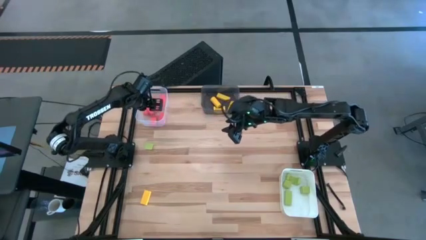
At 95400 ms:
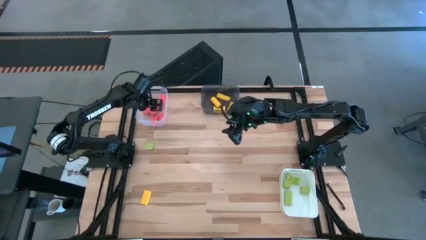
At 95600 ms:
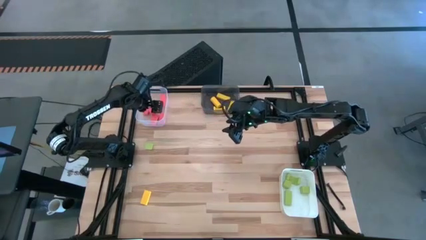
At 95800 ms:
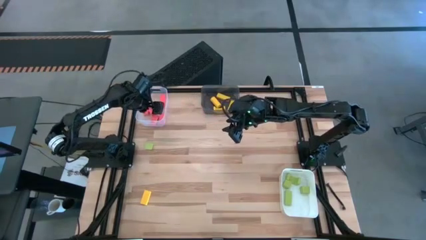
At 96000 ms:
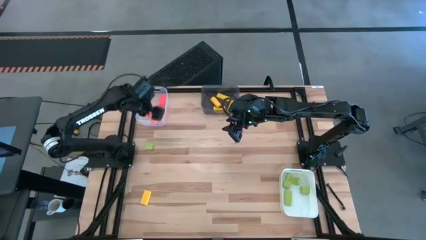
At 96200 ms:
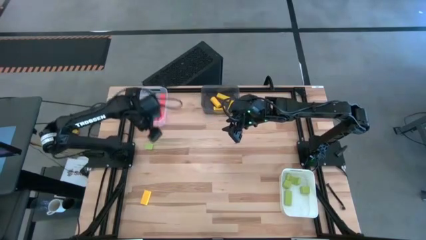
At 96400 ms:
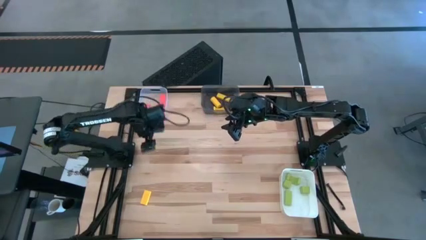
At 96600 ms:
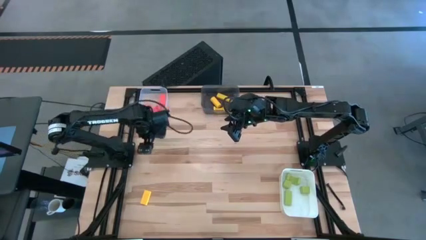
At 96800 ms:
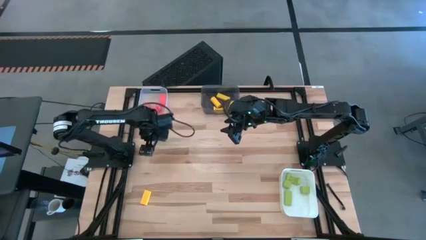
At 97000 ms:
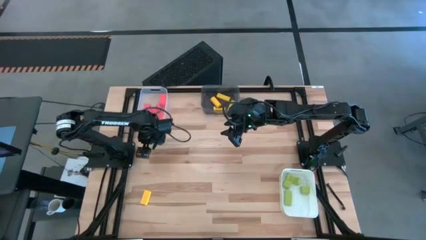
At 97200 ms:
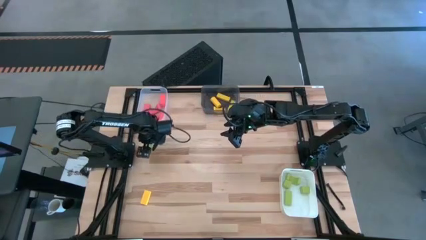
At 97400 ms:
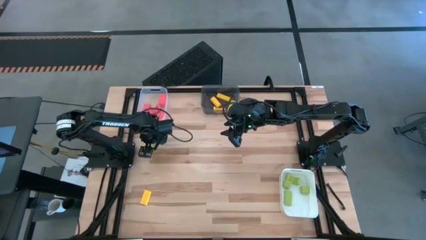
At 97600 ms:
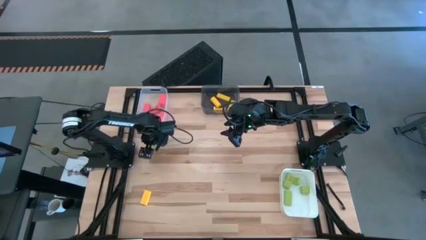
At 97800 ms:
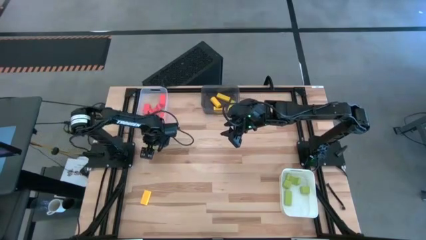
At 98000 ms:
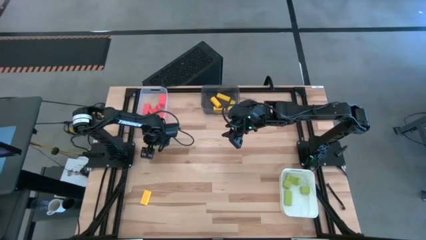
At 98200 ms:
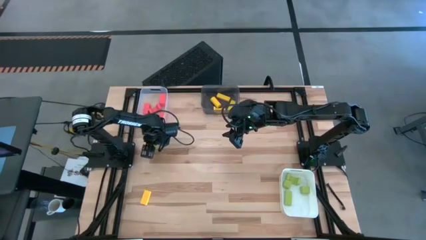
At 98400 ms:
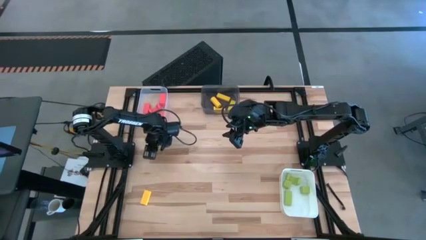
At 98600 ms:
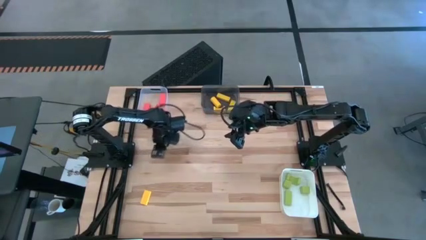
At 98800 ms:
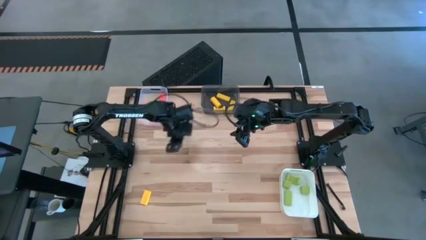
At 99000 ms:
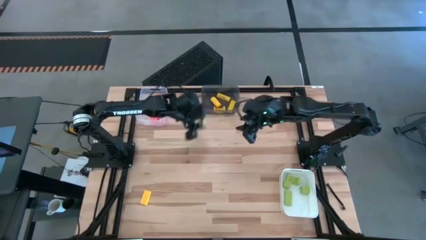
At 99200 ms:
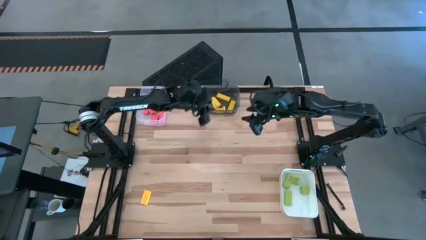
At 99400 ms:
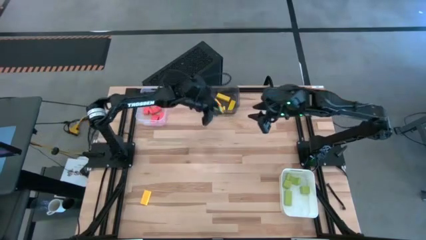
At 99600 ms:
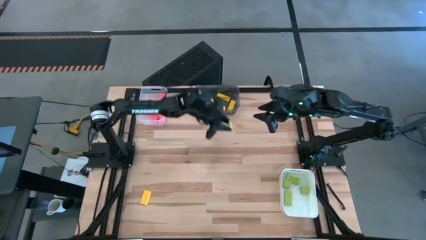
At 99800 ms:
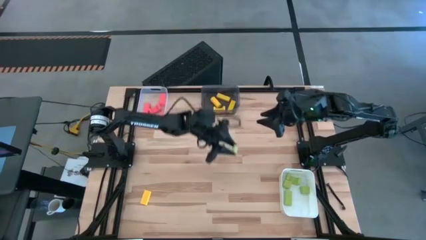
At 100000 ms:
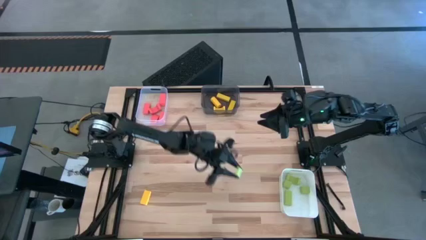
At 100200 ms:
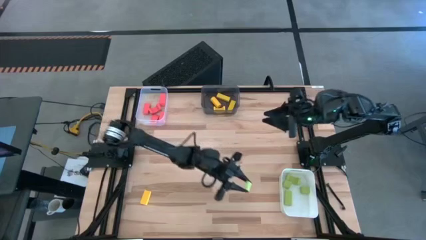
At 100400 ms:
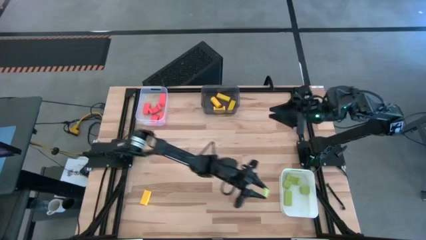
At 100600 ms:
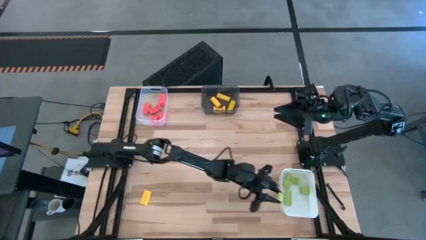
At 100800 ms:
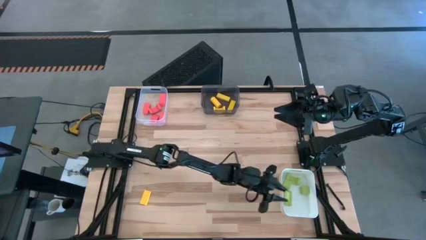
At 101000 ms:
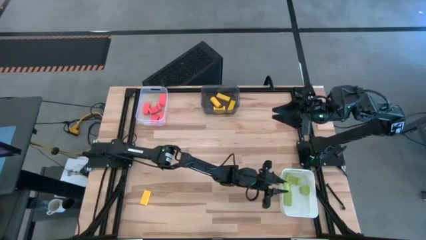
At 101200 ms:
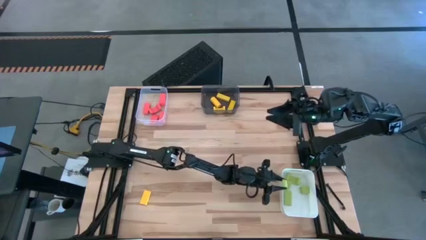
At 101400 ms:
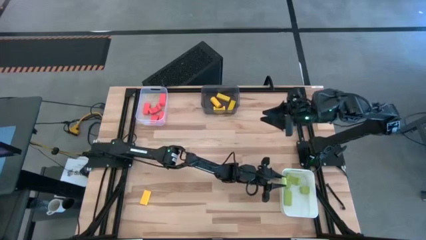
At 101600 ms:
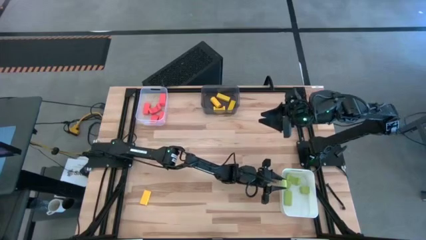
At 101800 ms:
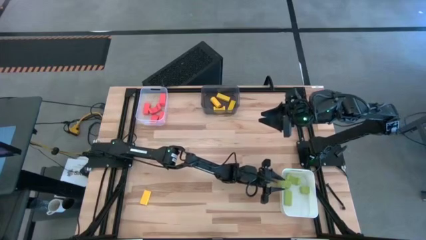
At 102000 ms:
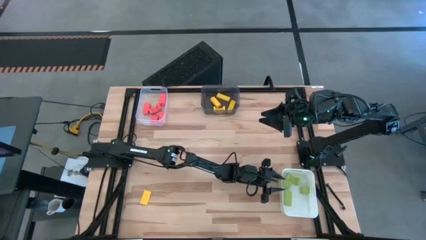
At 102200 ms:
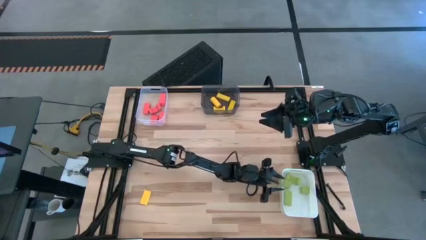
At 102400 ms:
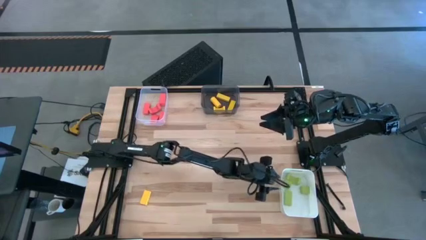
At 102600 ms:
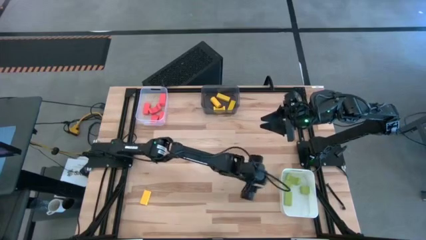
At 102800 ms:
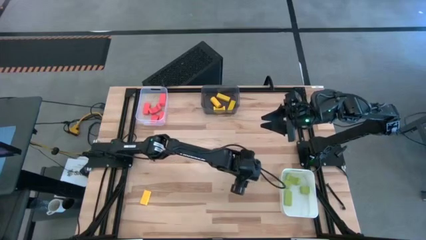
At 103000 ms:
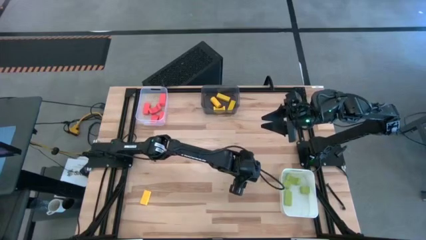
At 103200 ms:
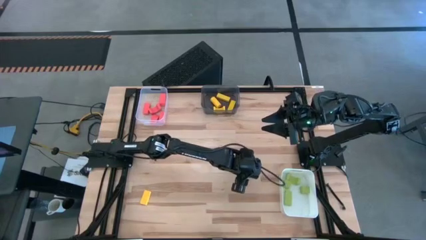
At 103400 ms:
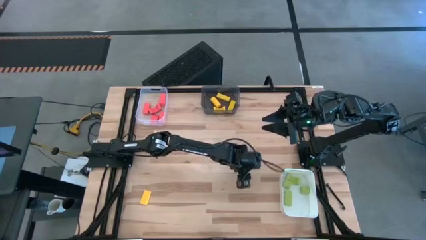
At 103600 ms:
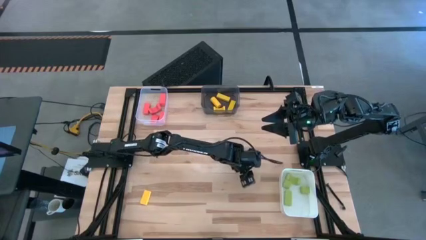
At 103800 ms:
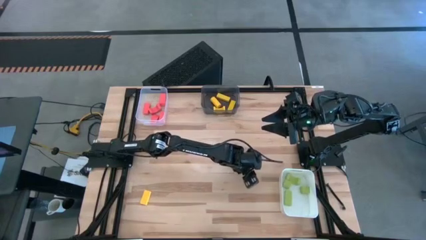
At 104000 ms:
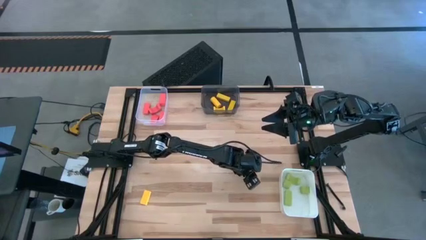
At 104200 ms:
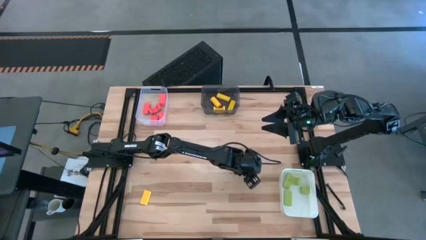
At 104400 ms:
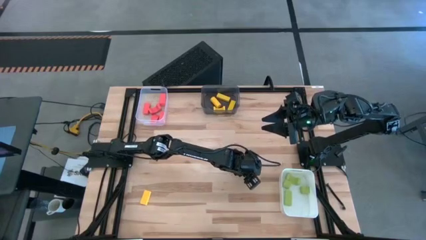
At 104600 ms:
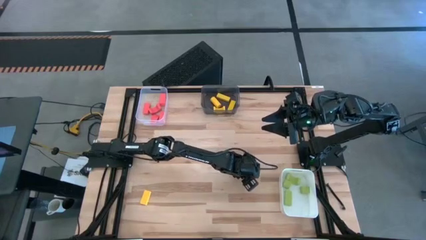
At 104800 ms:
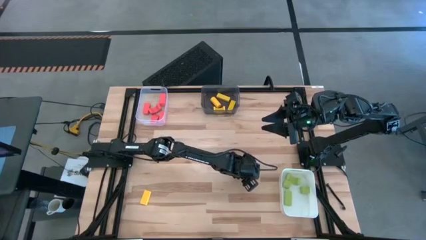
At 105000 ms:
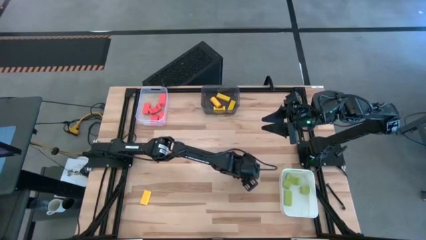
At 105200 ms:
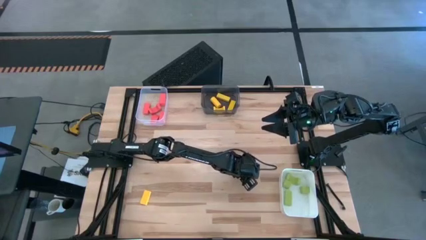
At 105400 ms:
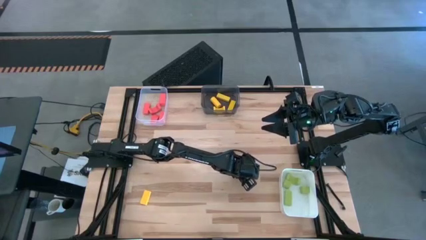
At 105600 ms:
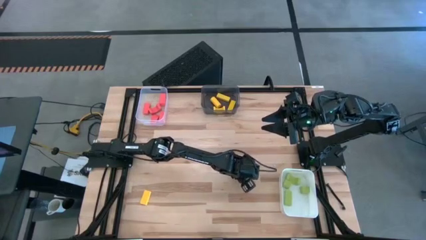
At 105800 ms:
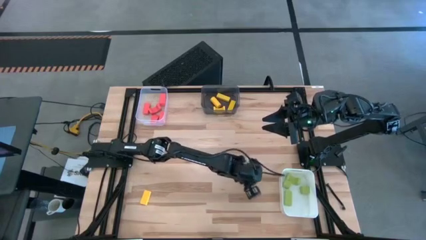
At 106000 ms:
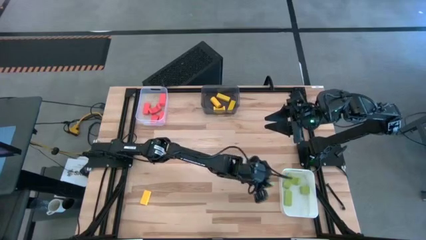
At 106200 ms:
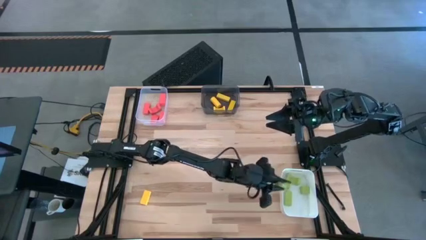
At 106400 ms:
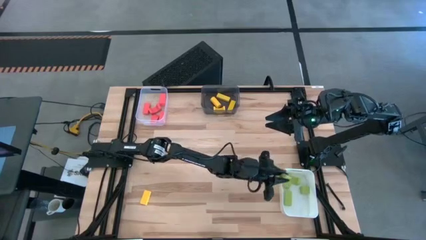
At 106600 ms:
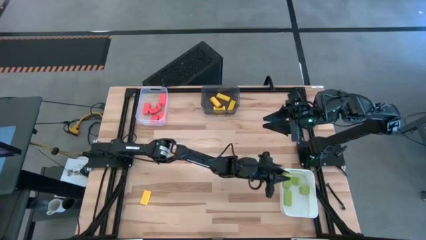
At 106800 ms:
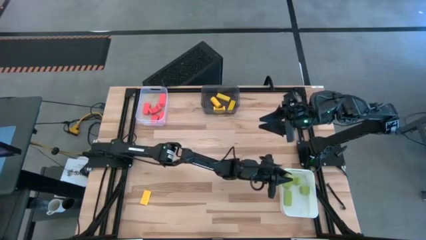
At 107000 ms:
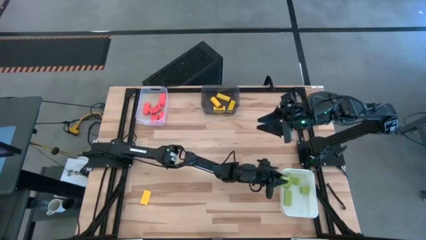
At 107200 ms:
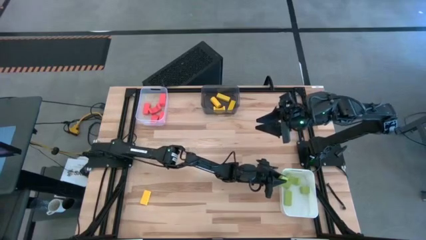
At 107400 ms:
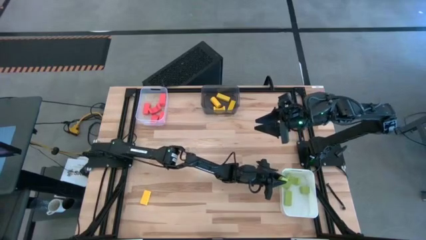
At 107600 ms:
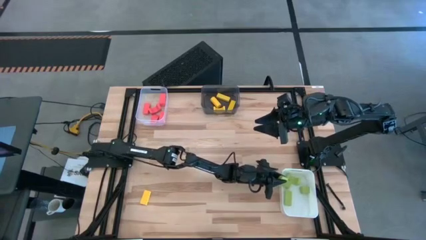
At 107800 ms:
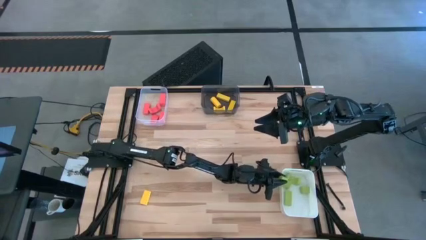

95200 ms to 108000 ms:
Task: Sort & place blocks by color
Put the green block into the white bin

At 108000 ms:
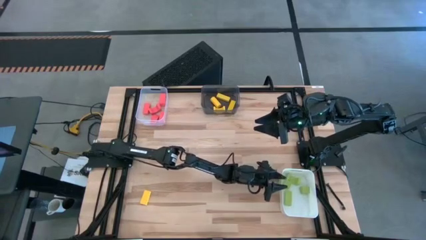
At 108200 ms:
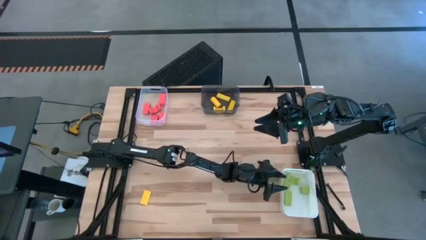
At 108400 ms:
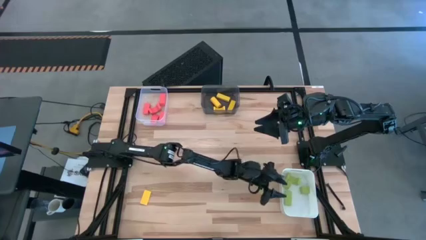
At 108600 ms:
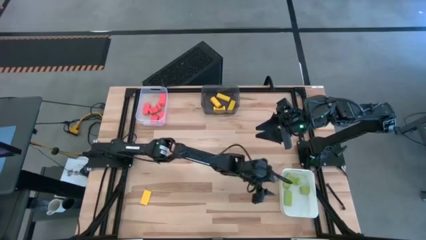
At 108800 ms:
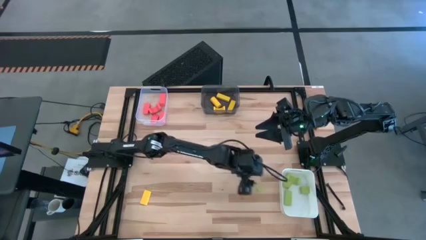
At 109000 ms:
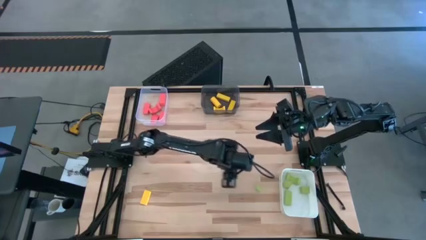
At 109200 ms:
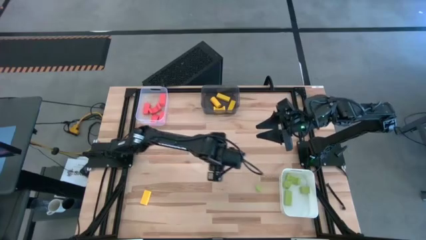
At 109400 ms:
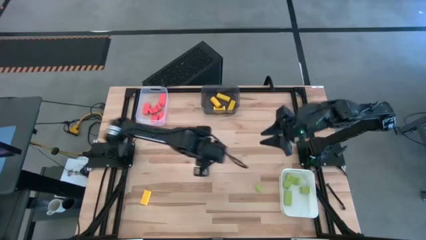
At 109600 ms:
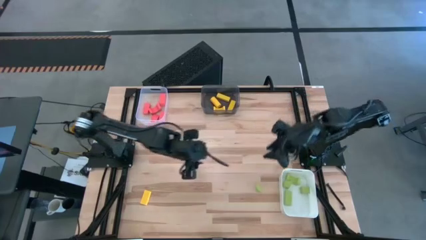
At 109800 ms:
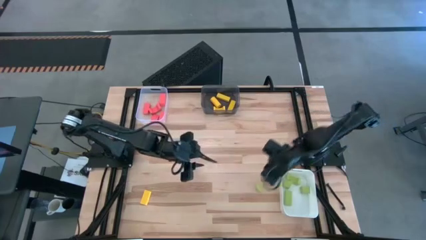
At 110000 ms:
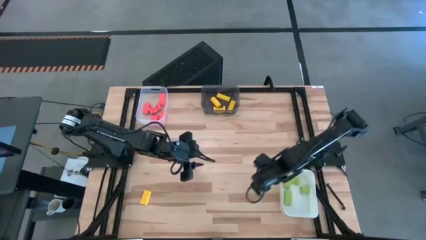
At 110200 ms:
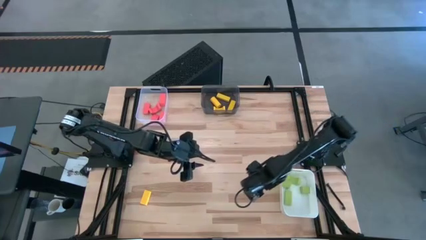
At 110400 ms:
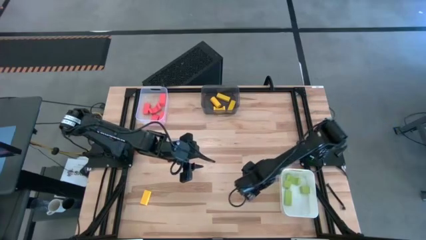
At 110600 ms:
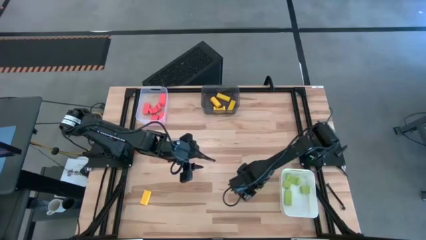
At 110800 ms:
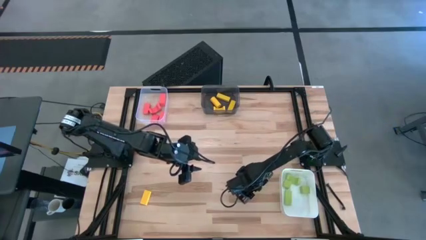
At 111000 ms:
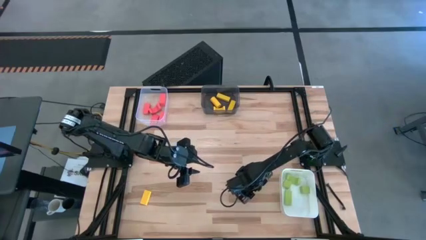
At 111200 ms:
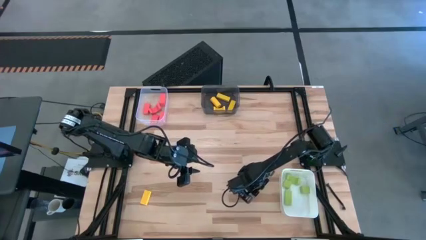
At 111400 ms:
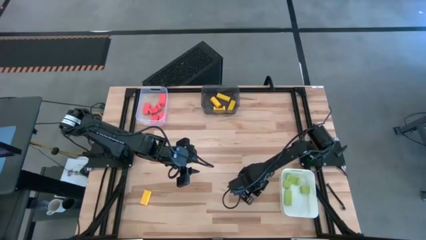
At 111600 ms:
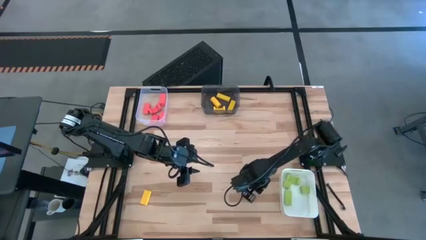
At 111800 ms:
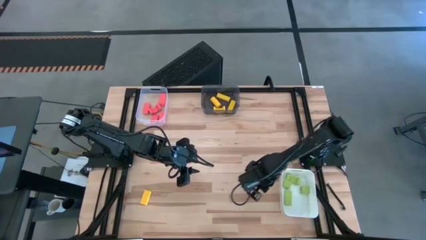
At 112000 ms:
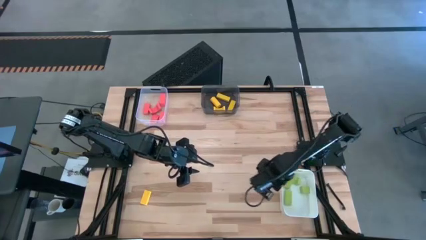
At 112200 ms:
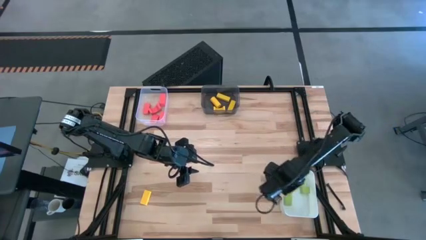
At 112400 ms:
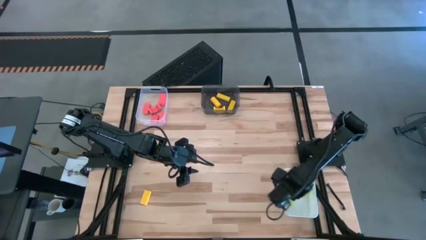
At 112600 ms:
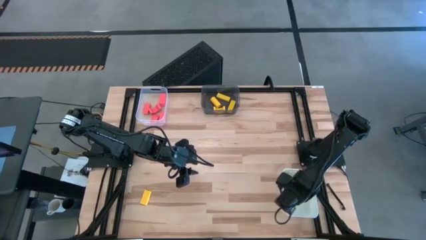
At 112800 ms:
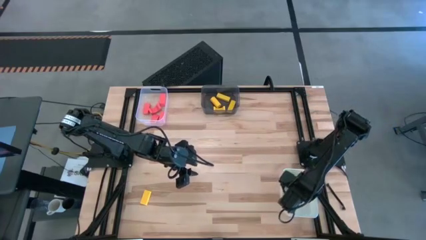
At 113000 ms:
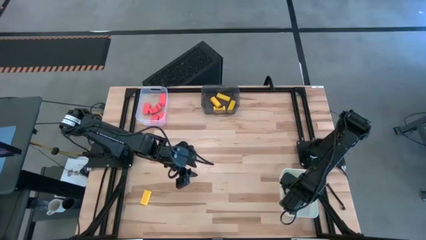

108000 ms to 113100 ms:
Put the green block into the white bin
